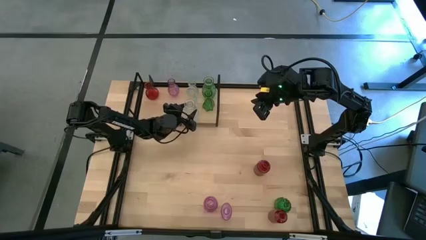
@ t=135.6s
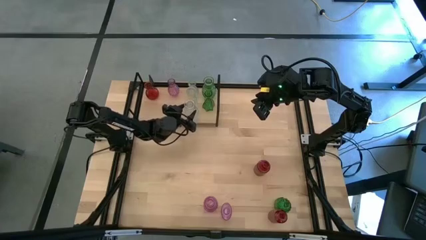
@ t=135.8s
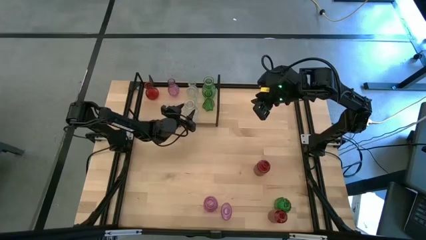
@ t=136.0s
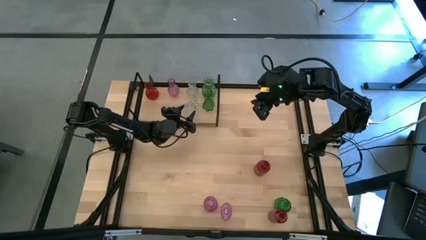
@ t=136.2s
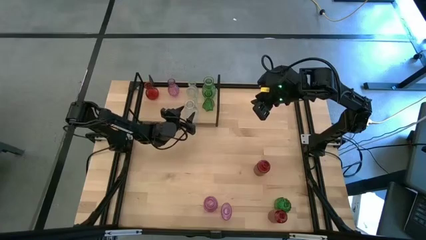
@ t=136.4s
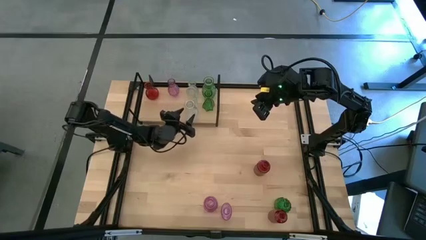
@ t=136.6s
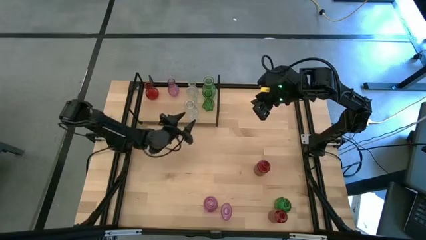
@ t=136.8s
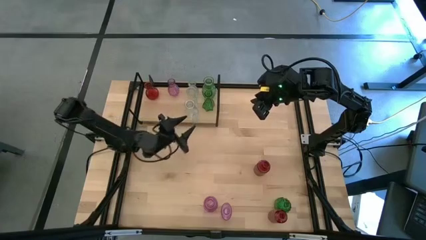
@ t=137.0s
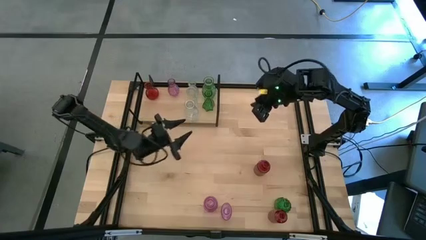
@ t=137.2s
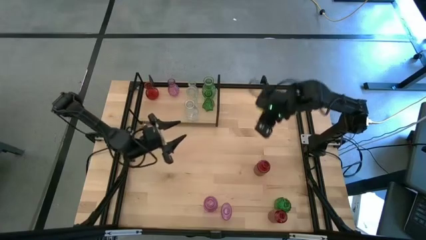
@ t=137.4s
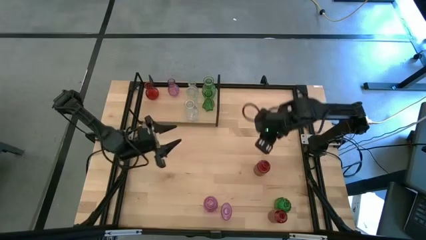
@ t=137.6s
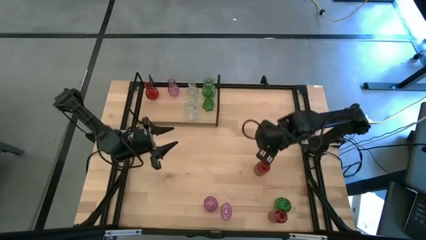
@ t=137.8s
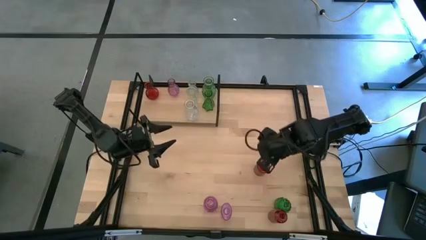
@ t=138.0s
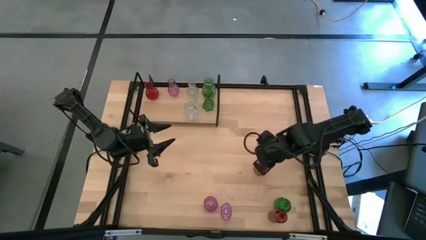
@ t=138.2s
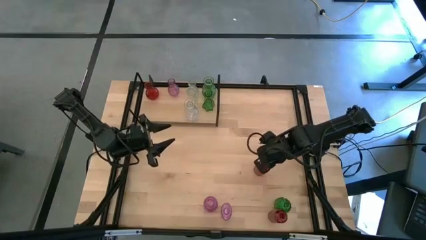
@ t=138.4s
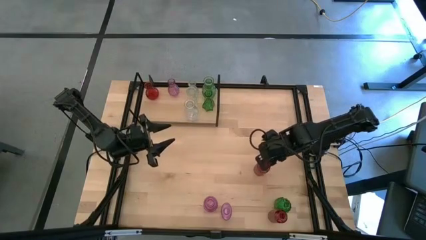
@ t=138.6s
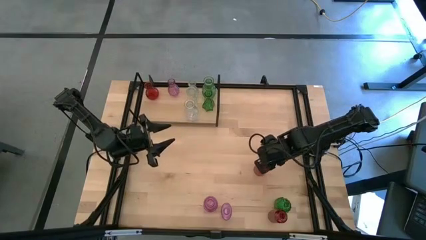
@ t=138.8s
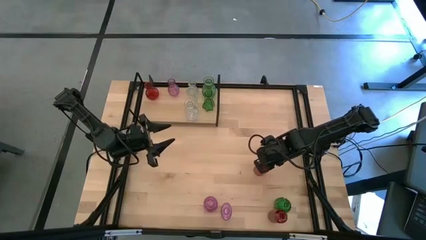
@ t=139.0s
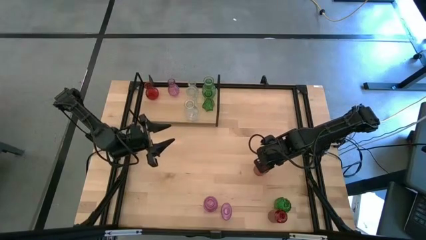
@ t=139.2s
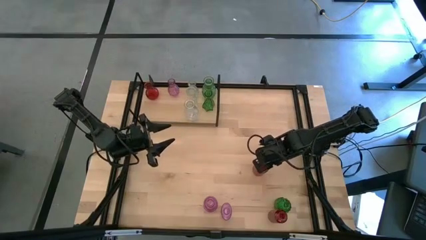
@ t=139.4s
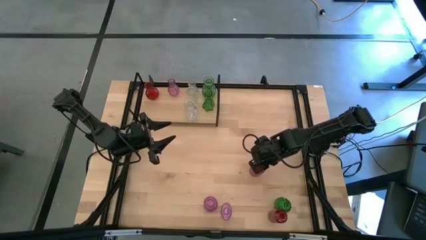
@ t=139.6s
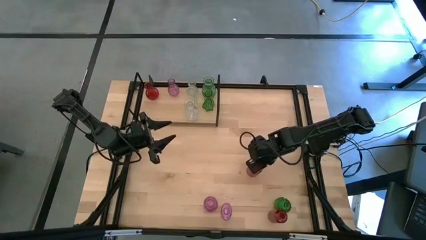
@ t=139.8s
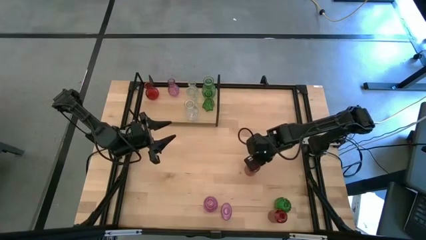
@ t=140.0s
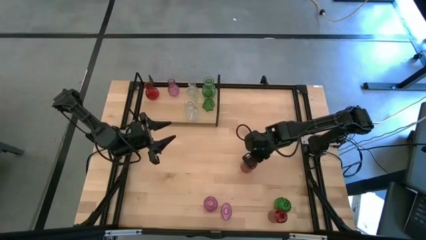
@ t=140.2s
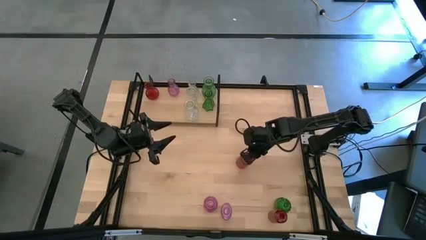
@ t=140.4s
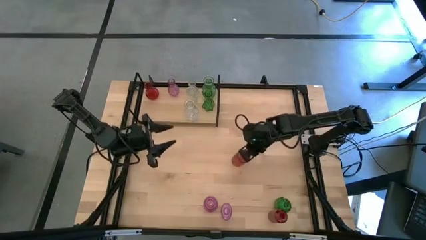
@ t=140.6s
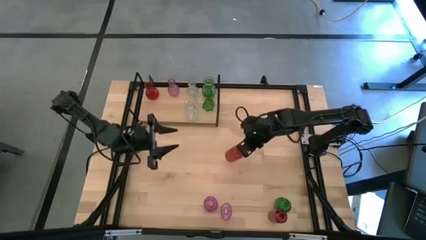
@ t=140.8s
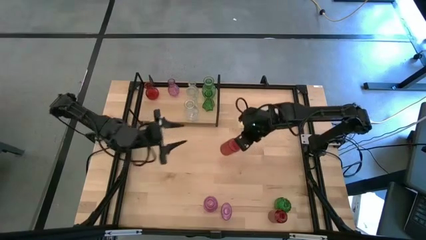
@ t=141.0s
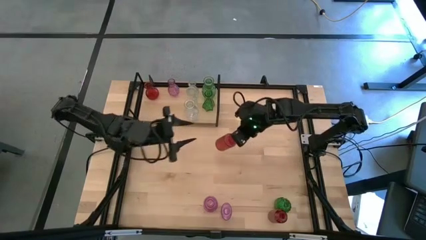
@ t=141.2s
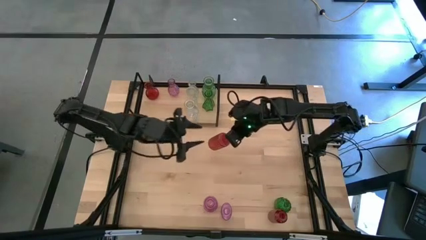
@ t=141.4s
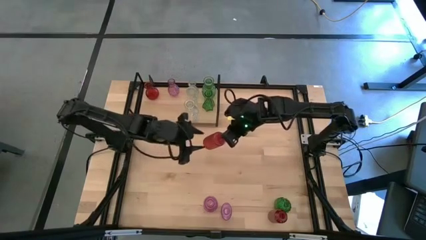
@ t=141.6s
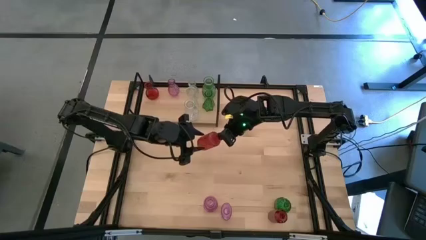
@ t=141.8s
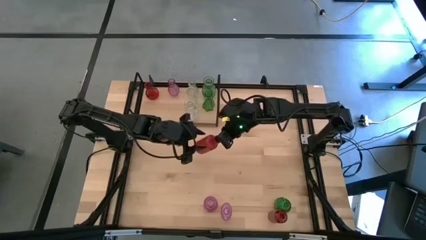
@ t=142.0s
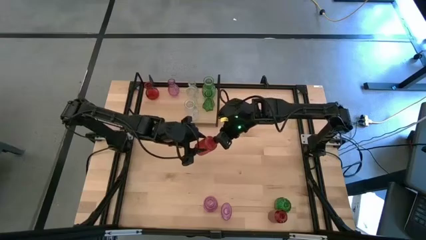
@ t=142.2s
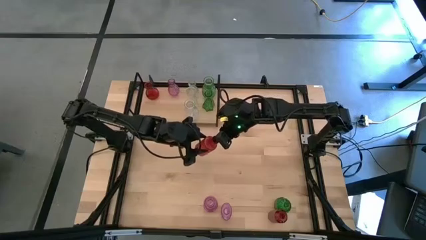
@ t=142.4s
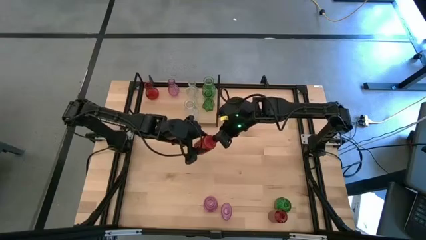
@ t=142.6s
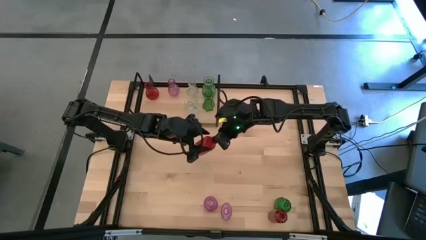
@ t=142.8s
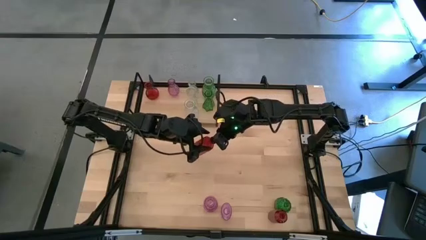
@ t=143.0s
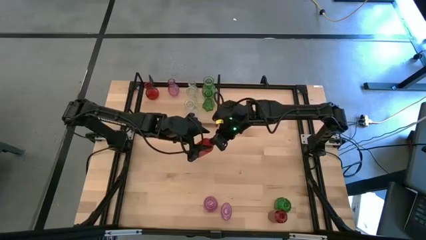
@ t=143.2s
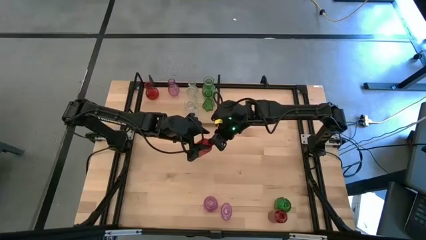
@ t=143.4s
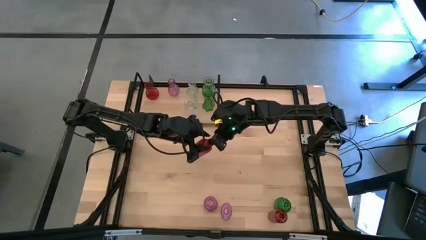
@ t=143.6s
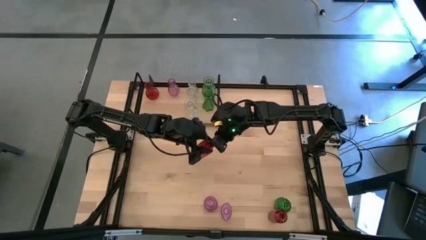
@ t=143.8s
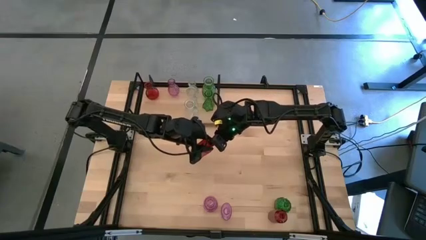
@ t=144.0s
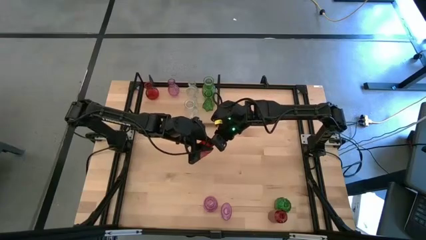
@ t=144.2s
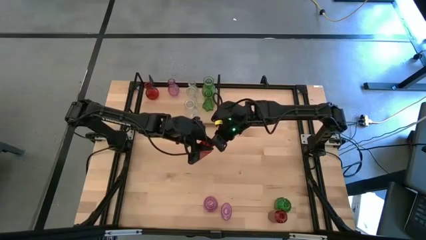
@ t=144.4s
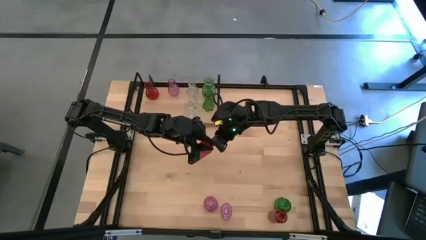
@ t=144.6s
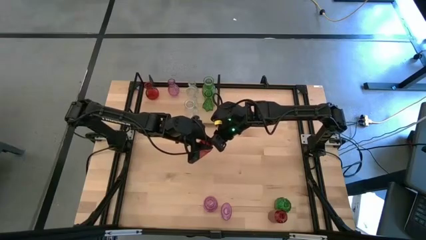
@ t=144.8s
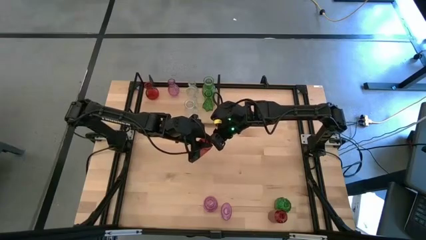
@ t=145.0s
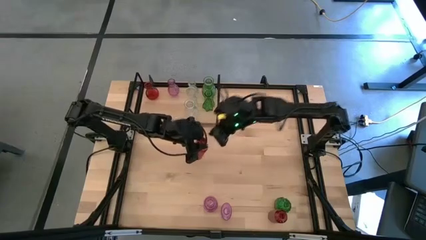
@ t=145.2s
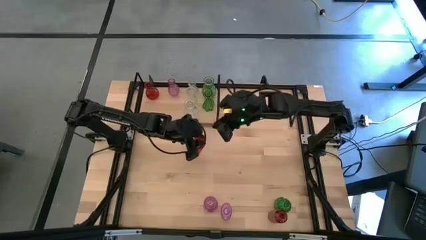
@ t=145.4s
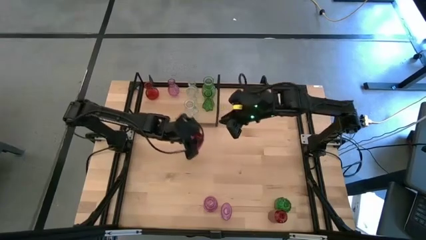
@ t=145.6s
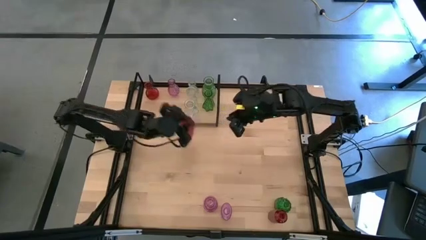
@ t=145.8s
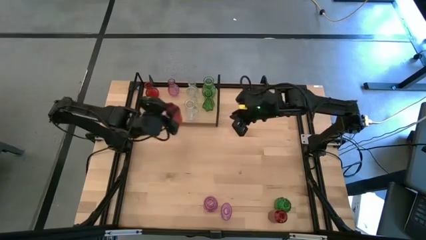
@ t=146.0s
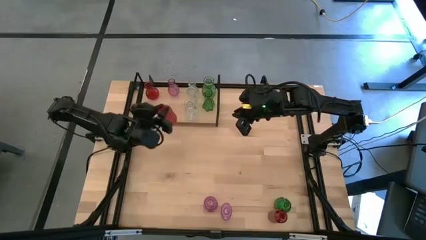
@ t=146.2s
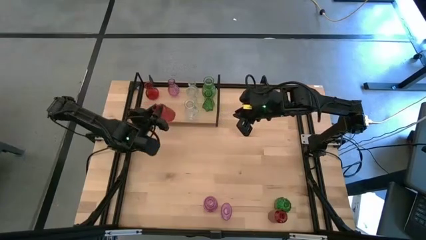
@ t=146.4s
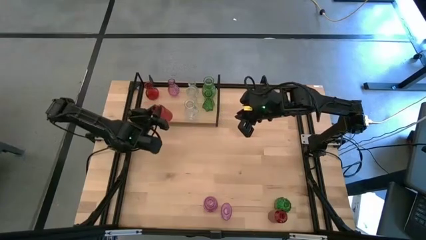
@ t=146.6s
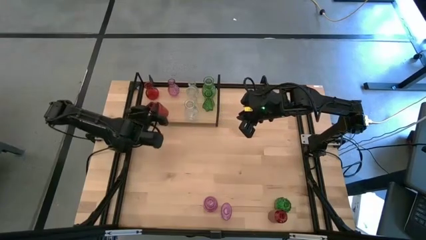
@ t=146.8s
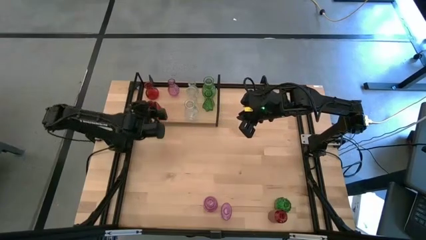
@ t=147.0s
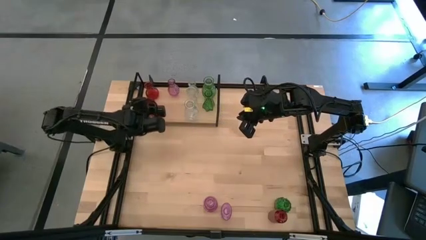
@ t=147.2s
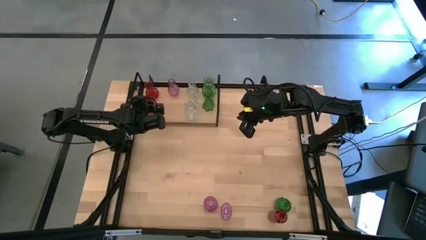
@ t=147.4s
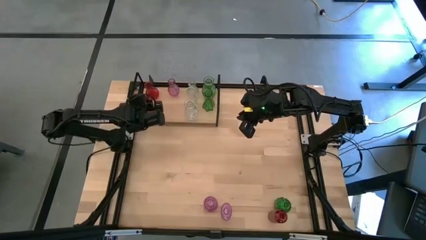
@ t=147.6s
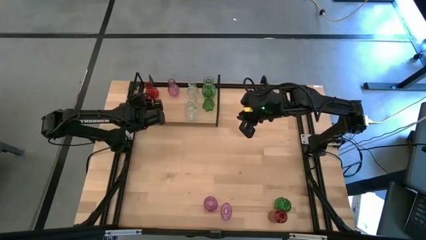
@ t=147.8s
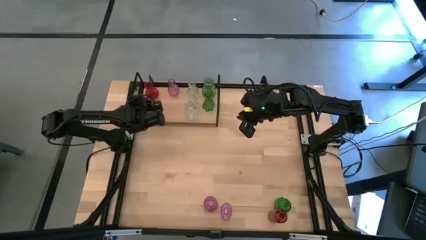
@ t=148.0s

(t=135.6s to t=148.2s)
Task: sort vases onto shelf
Put the top red vase on the shelf aligned with the other red vase

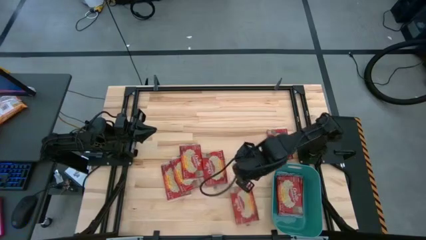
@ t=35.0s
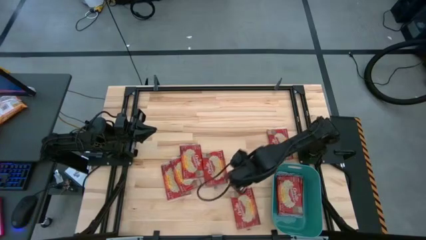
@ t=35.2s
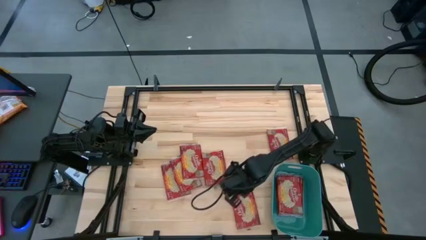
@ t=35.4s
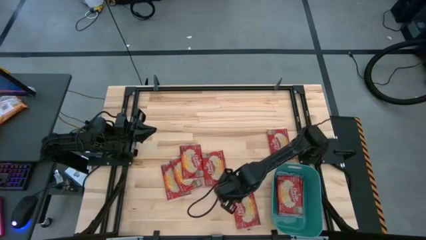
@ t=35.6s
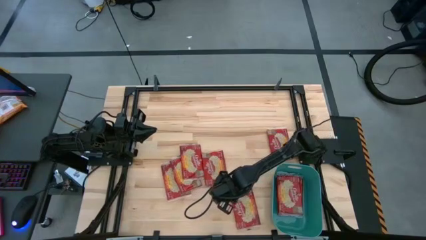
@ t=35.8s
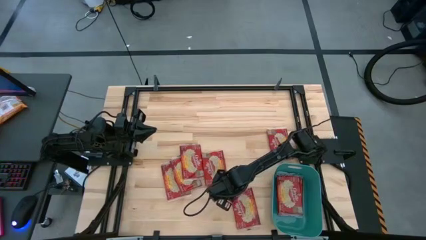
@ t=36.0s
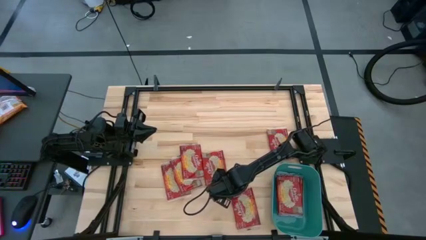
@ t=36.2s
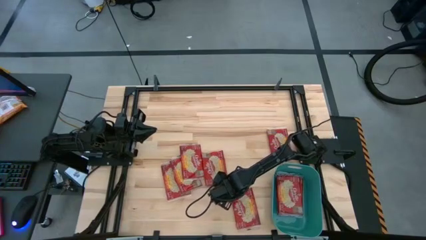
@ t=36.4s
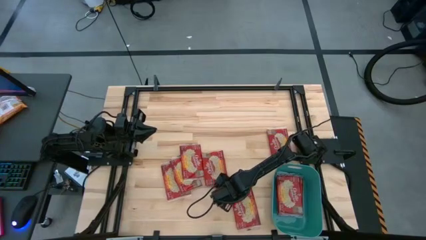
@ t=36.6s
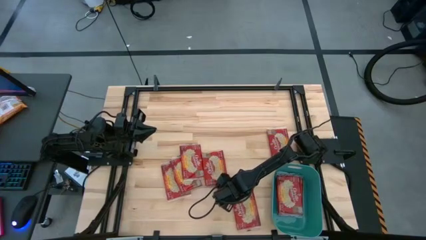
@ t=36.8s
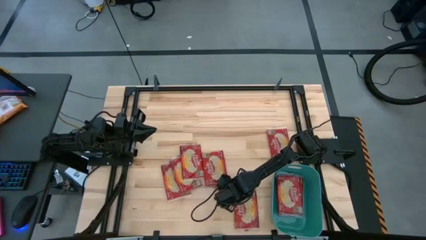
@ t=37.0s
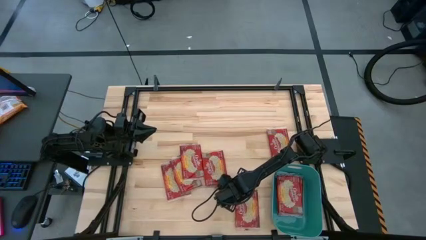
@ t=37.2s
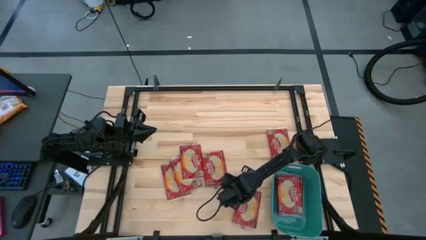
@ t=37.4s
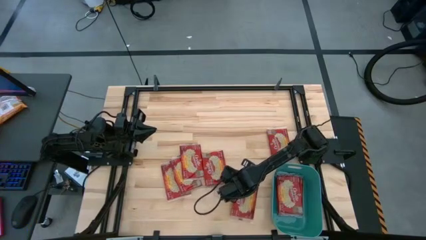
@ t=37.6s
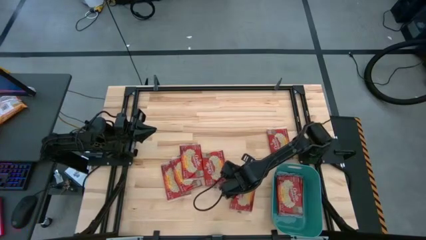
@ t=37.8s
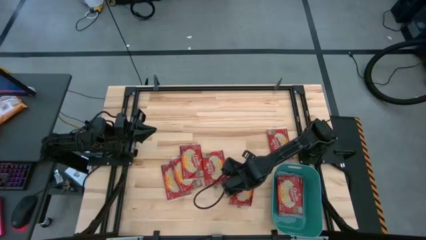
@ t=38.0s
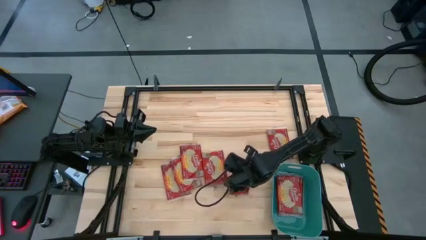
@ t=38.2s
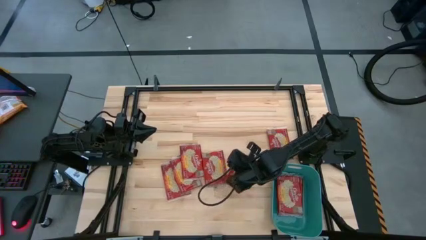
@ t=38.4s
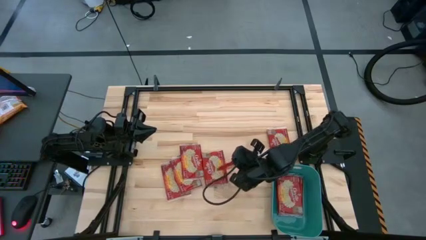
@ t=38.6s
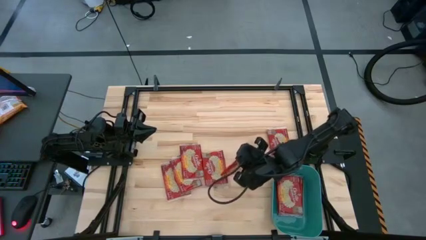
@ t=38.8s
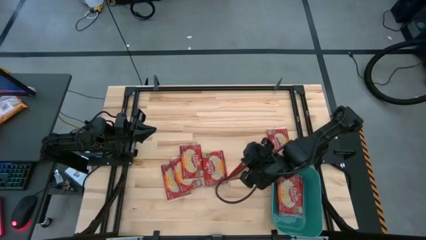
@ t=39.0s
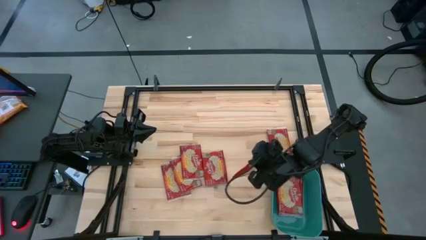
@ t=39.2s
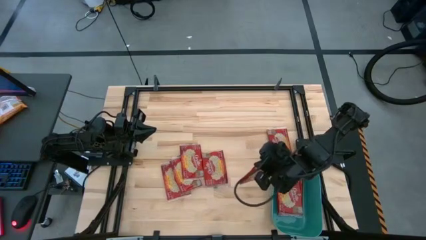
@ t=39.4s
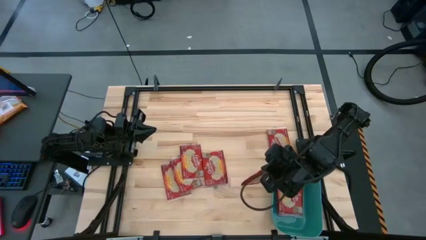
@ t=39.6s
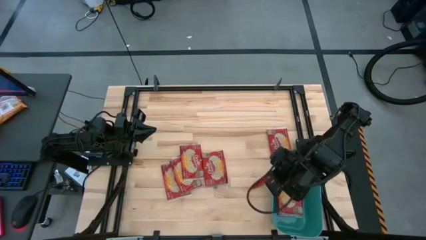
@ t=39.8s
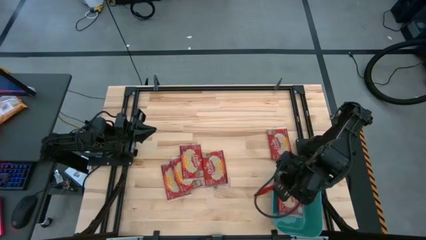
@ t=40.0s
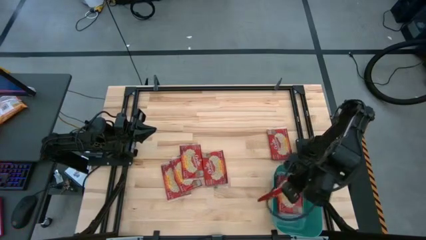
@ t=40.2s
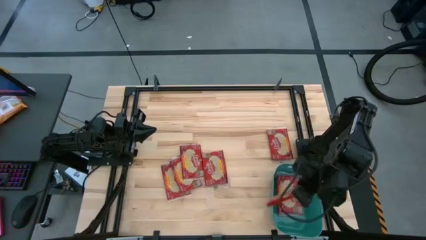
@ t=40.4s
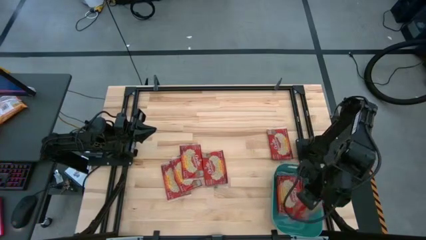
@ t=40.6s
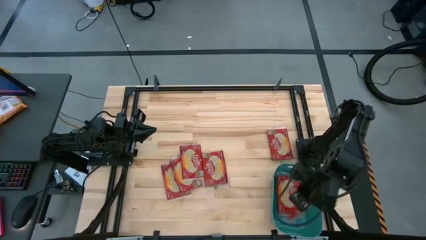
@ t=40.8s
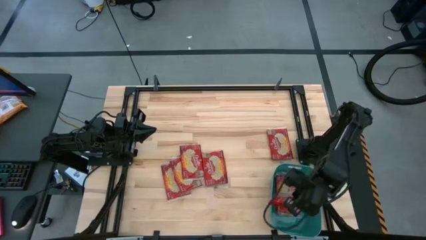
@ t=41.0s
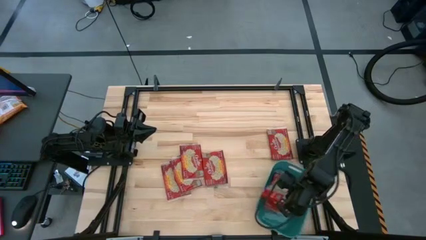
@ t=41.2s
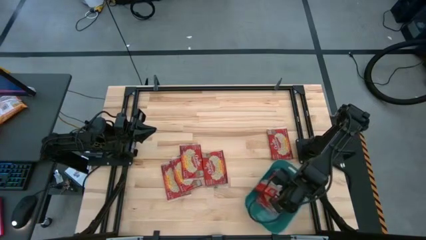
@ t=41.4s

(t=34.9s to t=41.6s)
Task: Sort popcorn bags into baskets
Put the red popcorn into the green bin
